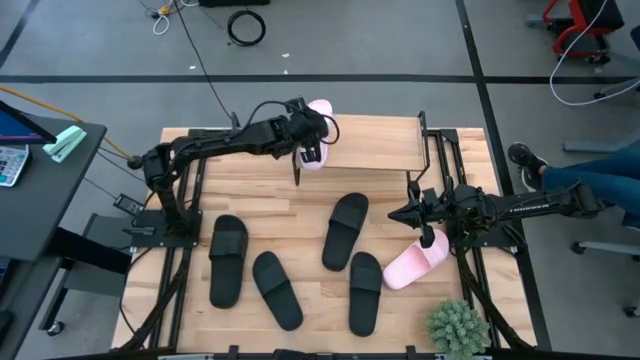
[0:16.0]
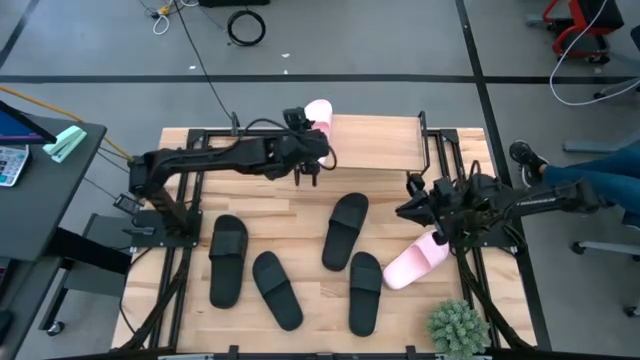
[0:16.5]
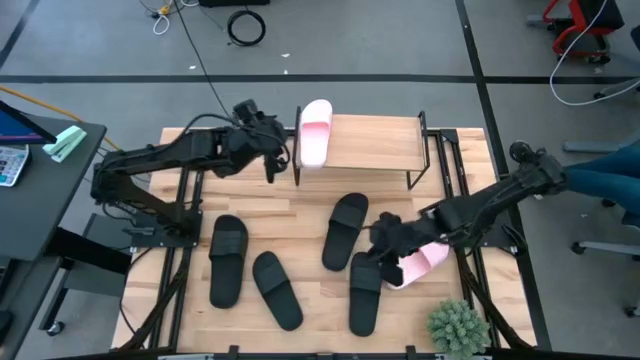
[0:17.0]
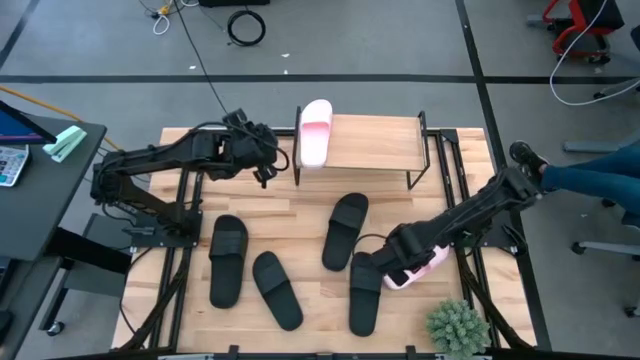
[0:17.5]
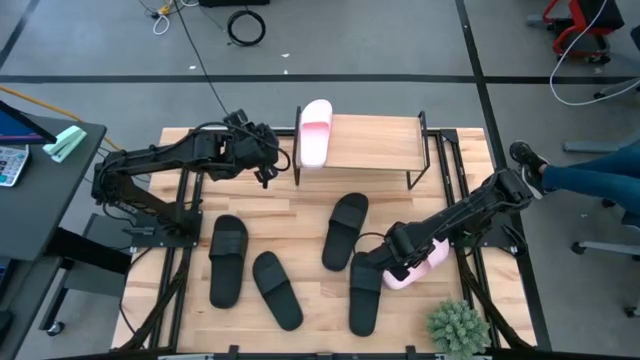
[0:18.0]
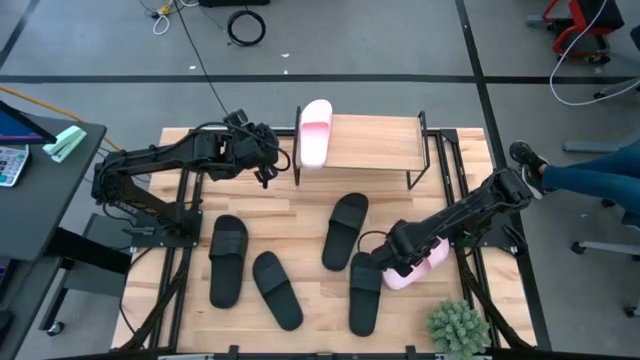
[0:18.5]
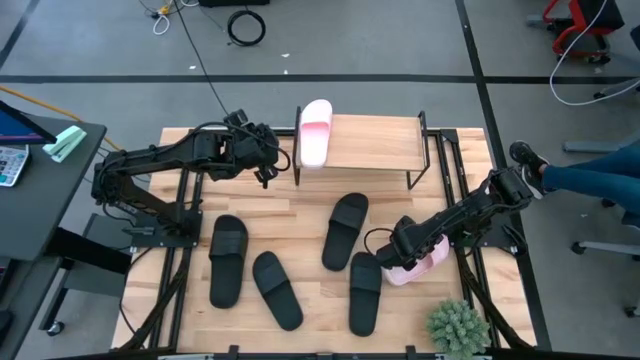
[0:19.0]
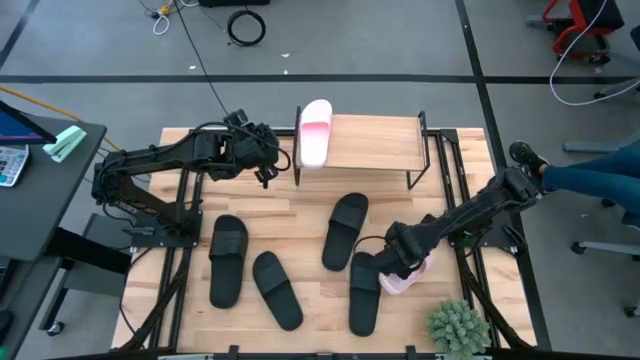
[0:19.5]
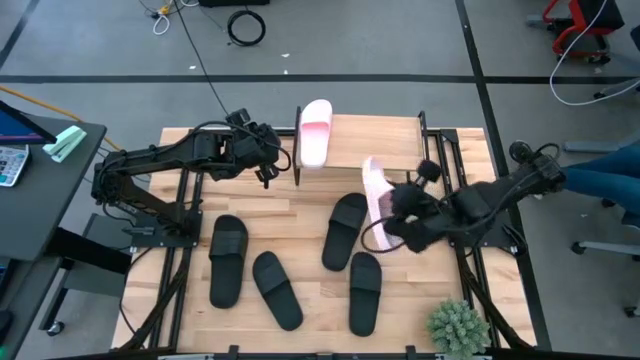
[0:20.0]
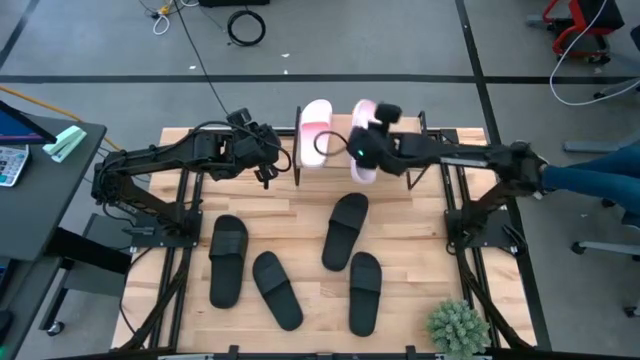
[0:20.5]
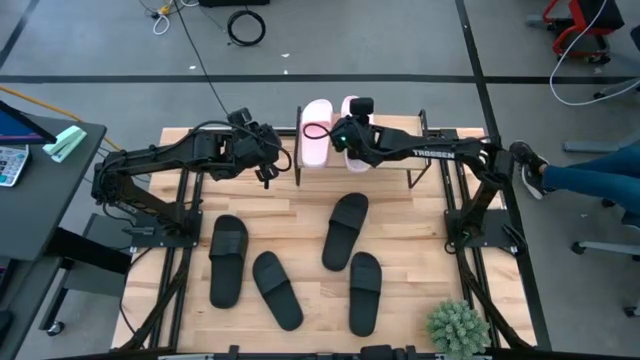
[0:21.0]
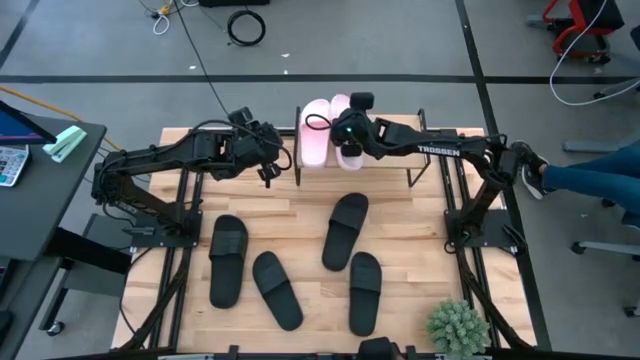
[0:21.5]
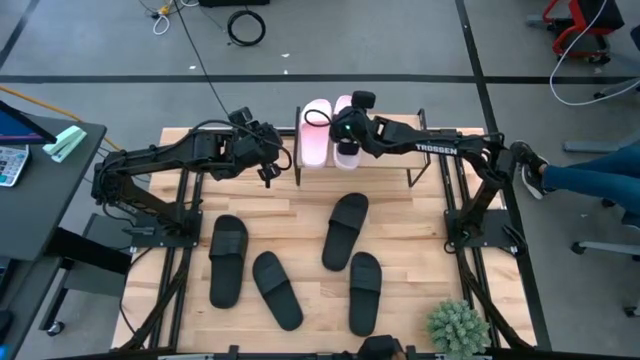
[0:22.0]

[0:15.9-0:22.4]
Task: Pick and place slides into the shelf
Put the pink slide on the shelf

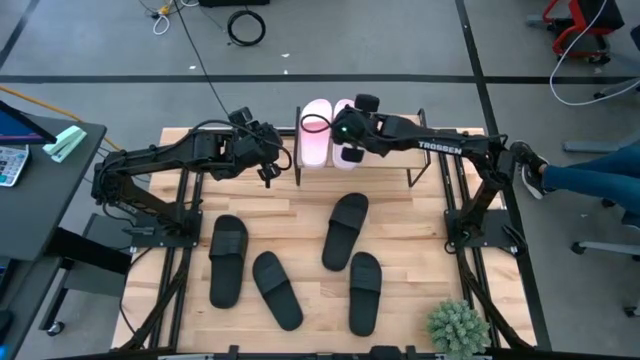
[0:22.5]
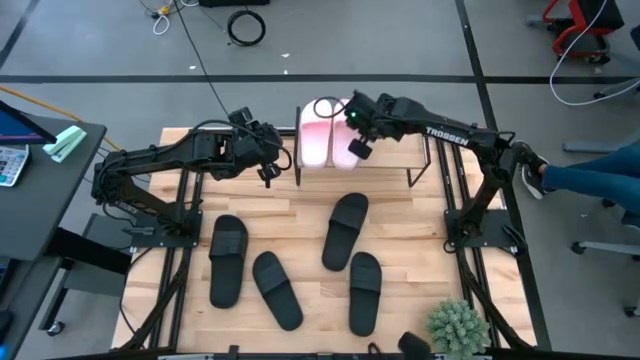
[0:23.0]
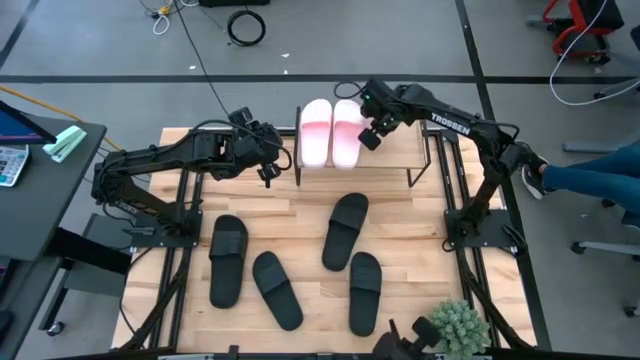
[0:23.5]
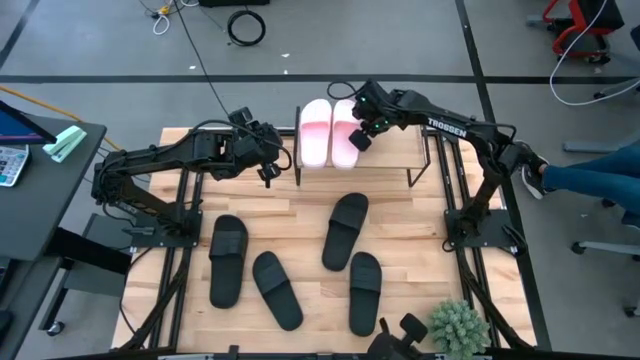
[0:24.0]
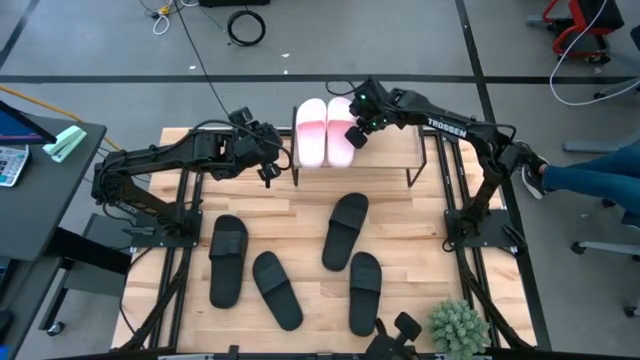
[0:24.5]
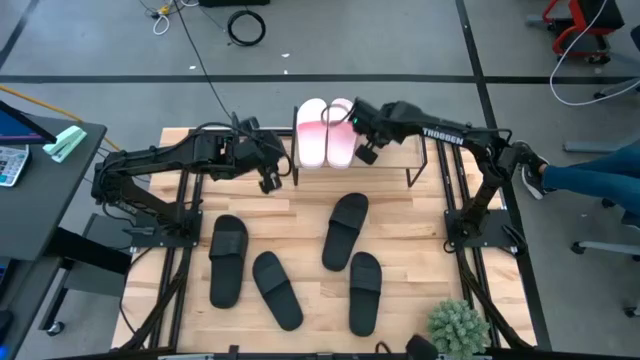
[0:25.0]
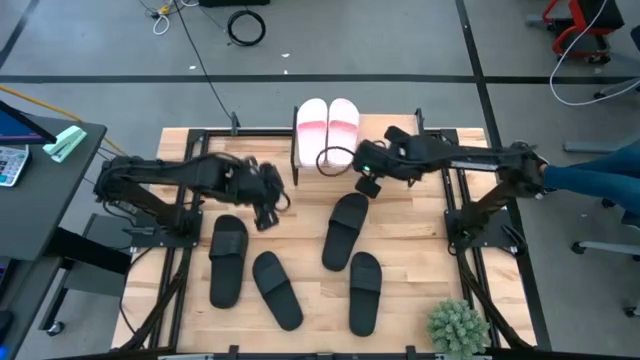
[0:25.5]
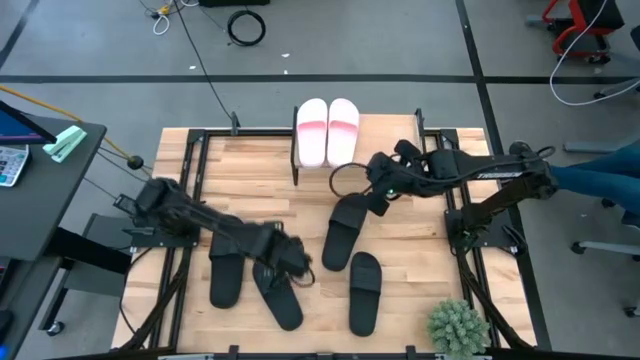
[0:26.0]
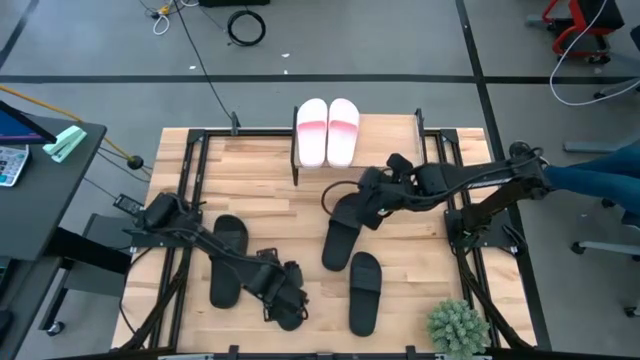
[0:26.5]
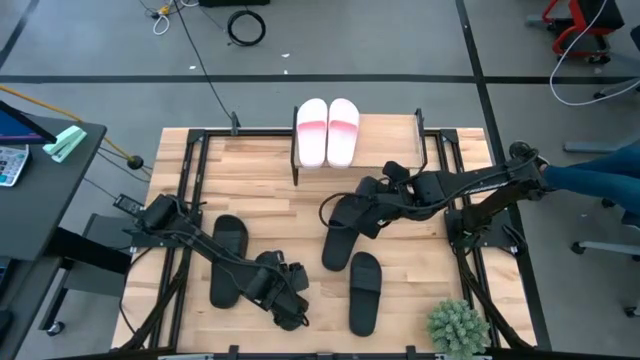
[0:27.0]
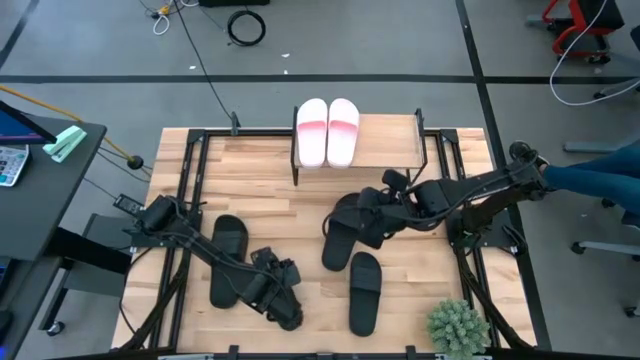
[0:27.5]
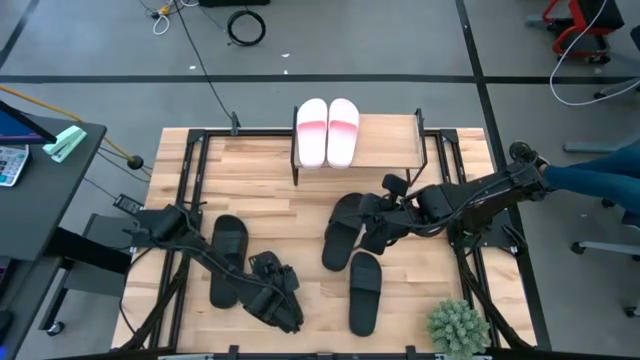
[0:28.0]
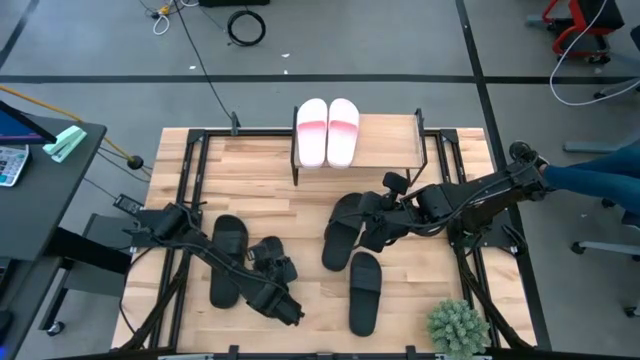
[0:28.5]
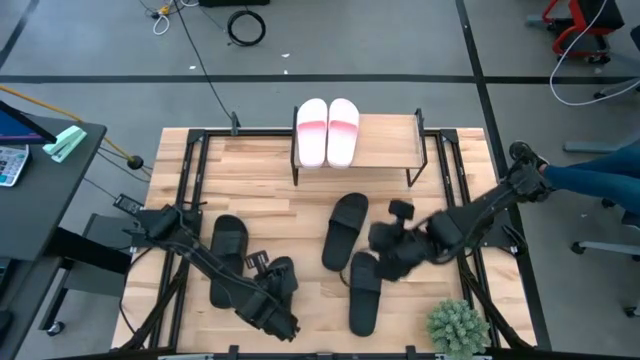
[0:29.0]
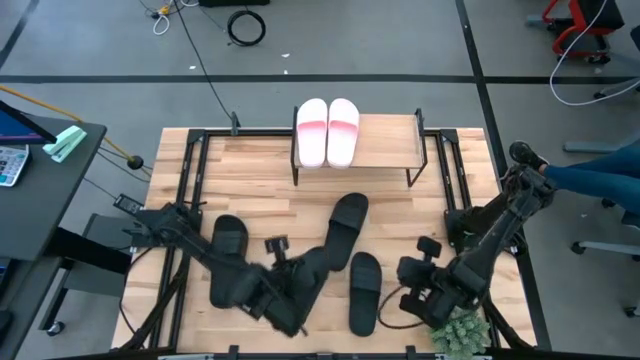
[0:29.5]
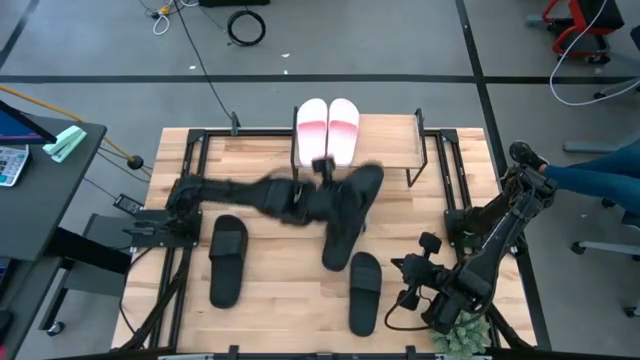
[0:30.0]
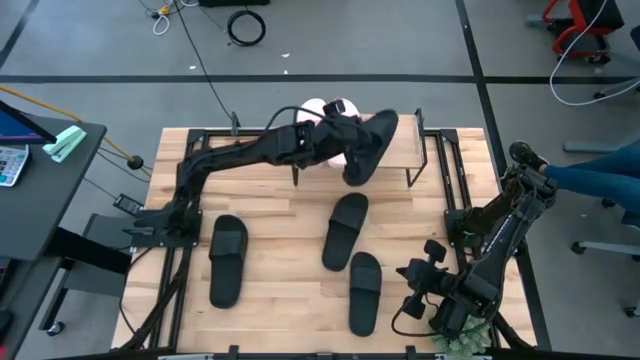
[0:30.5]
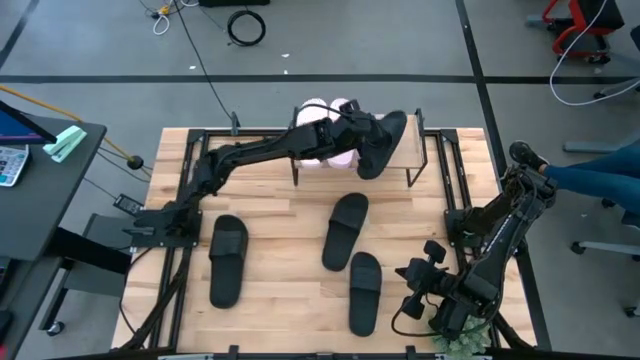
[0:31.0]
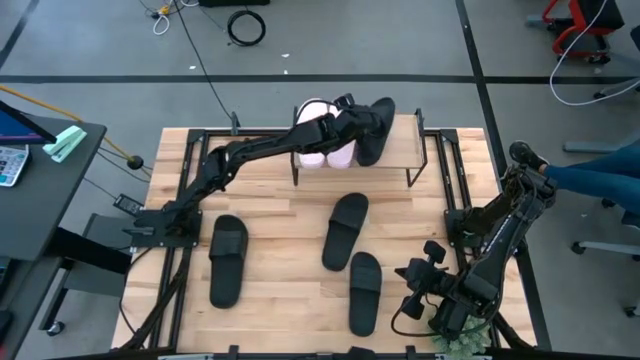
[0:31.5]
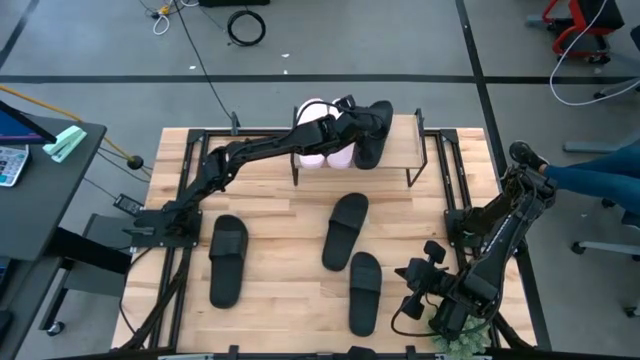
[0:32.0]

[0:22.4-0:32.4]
Put the bottom left black slide on the shelf

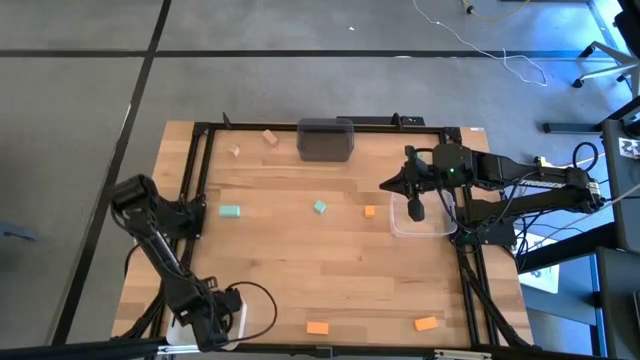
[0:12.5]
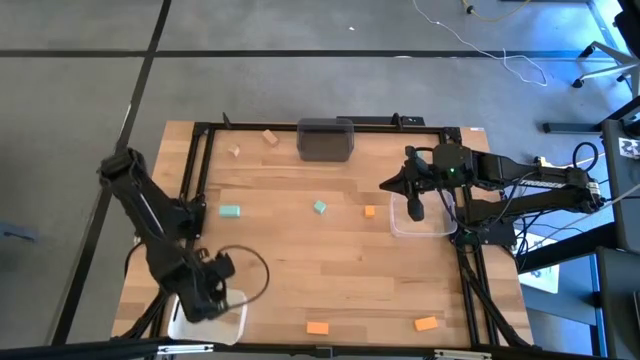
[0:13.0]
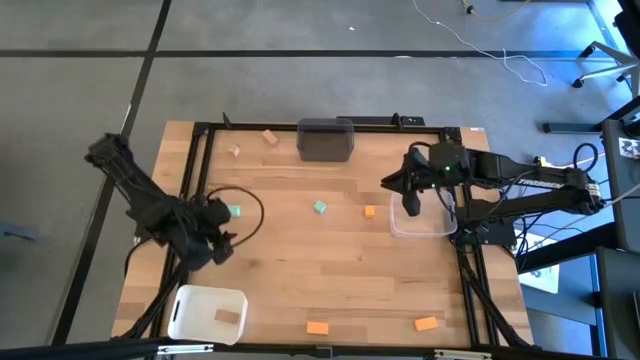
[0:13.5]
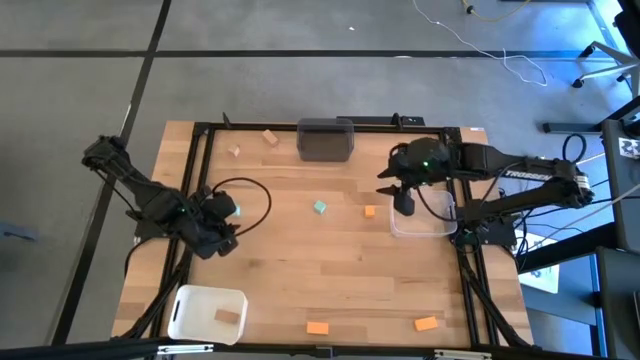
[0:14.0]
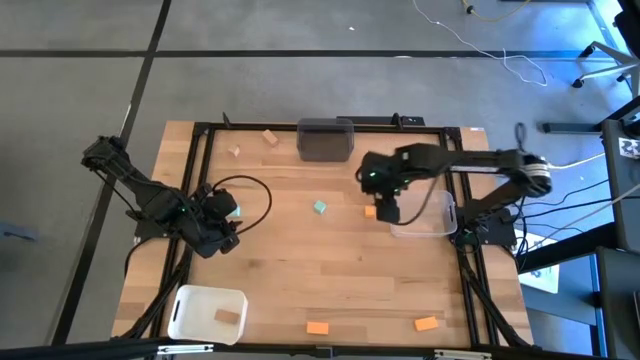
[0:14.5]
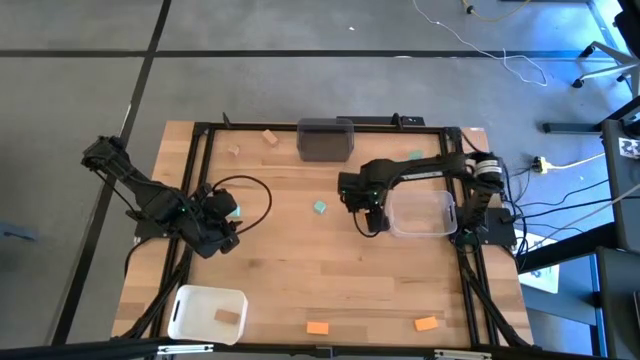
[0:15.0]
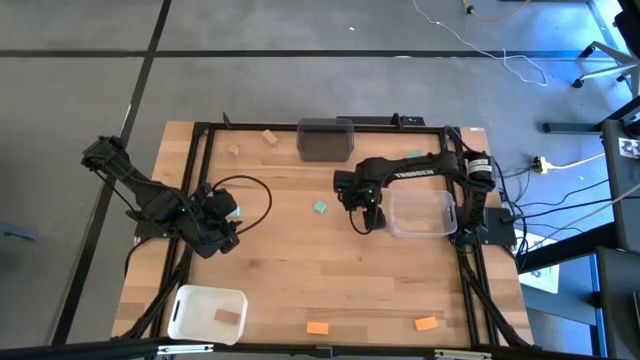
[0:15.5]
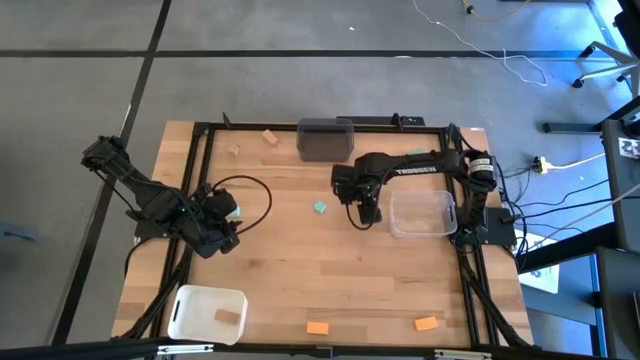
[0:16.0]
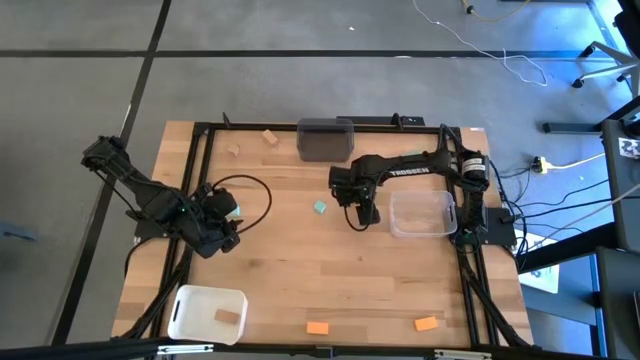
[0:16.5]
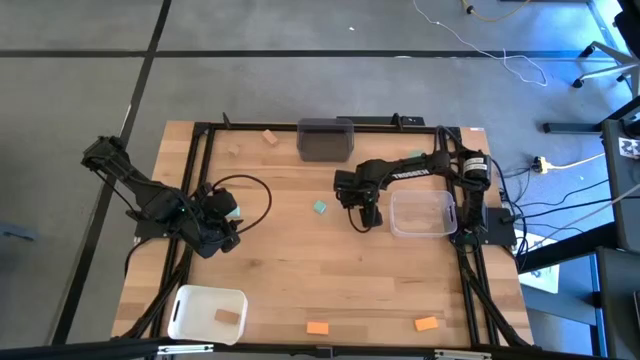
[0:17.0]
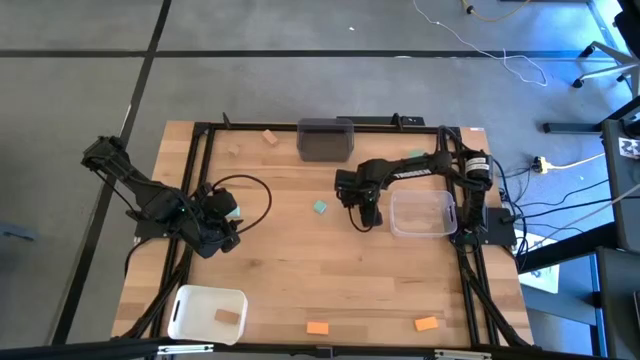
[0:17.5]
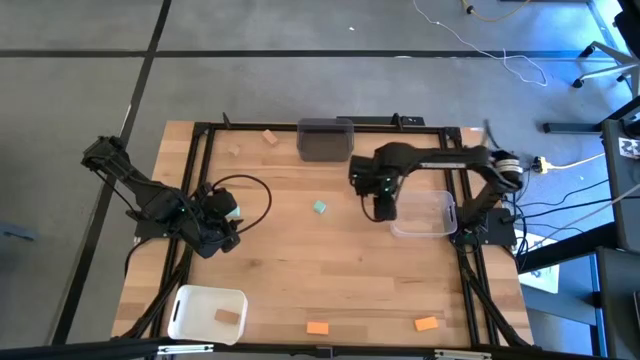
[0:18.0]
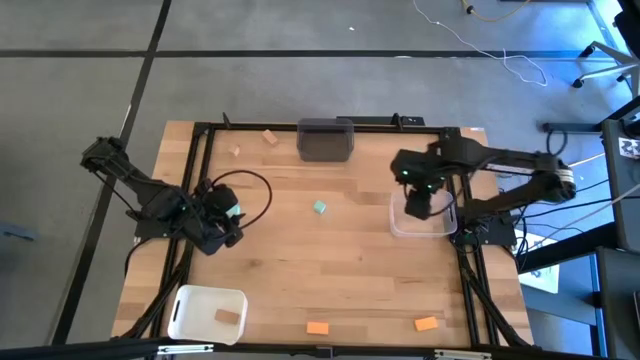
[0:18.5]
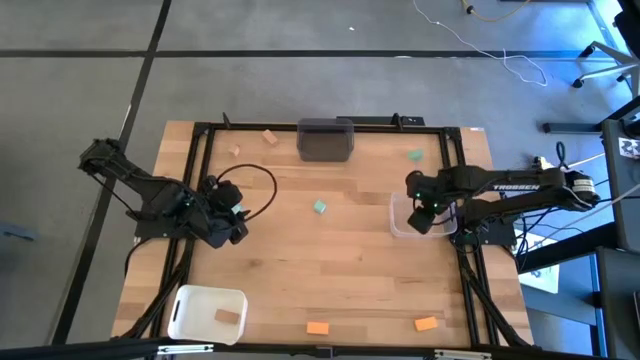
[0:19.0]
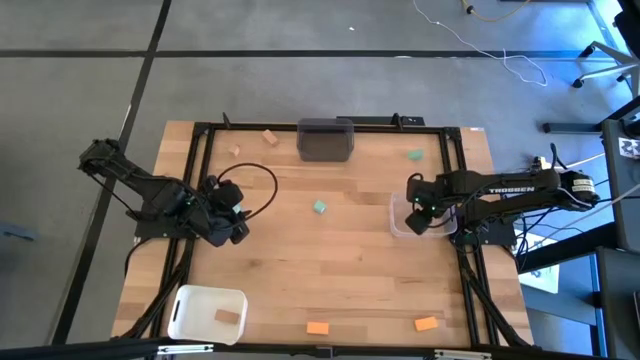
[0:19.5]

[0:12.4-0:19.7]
Task: Sort & place blocks by color
Put the top yellow block into the transparent bin
